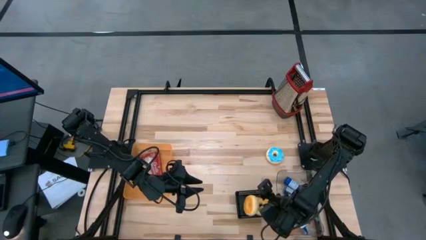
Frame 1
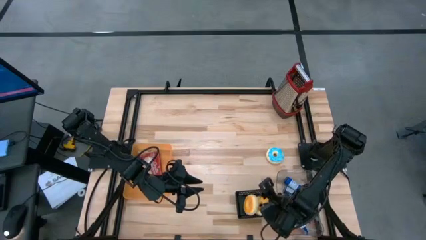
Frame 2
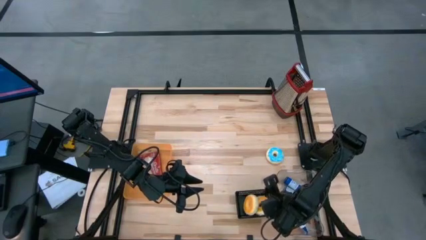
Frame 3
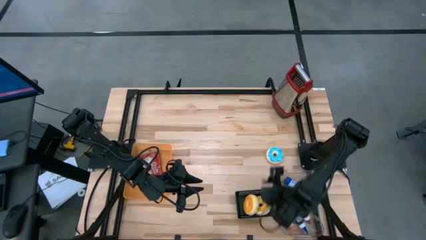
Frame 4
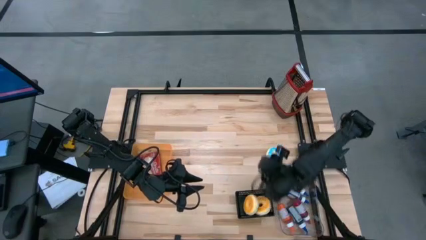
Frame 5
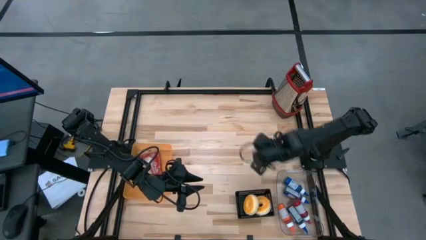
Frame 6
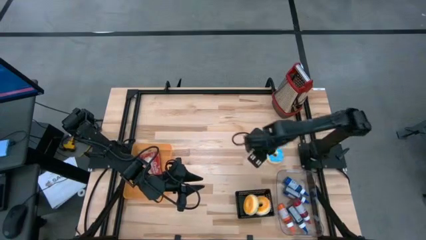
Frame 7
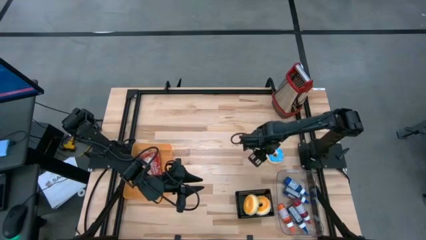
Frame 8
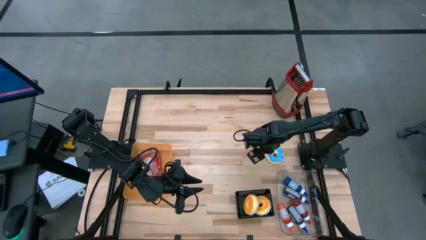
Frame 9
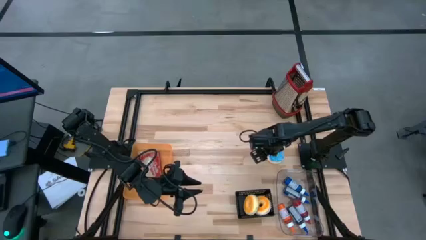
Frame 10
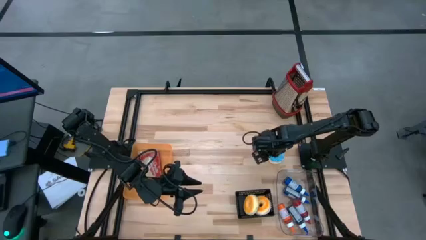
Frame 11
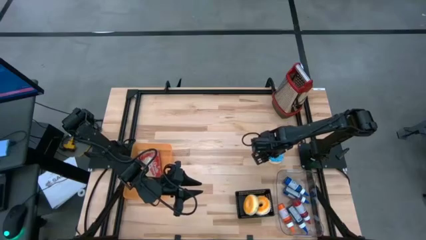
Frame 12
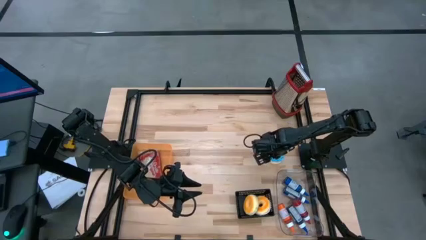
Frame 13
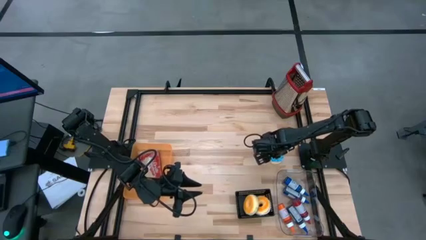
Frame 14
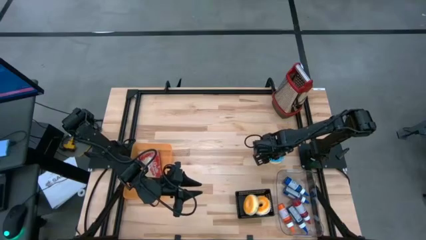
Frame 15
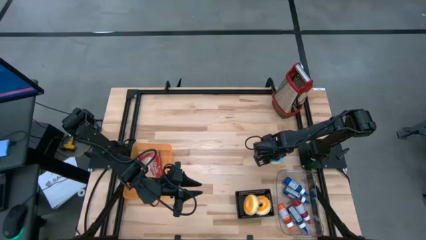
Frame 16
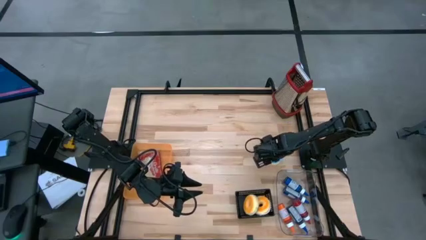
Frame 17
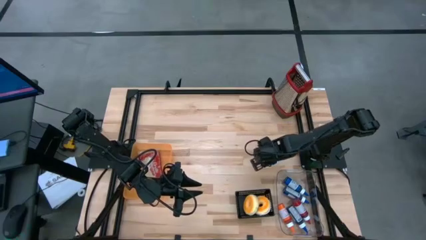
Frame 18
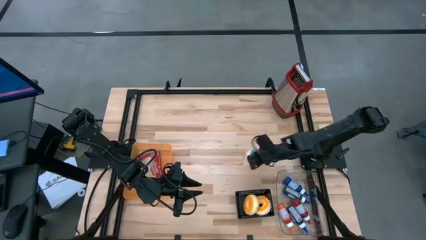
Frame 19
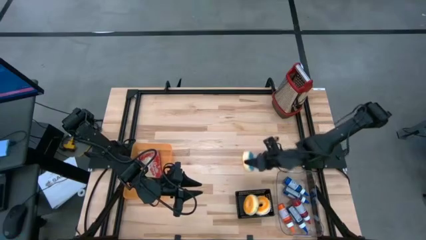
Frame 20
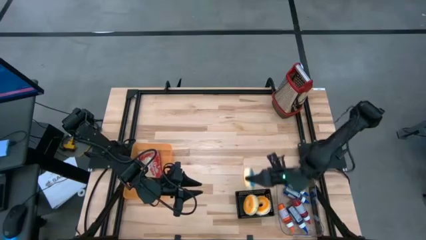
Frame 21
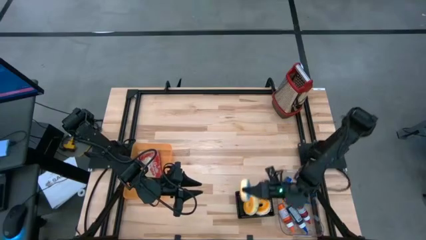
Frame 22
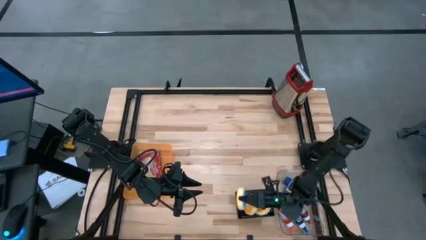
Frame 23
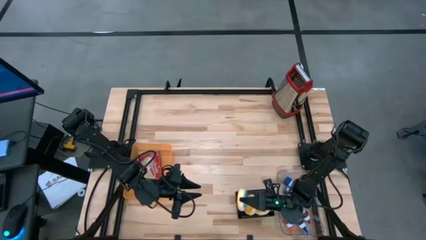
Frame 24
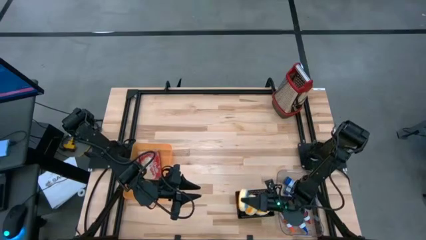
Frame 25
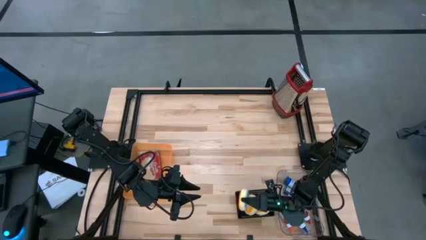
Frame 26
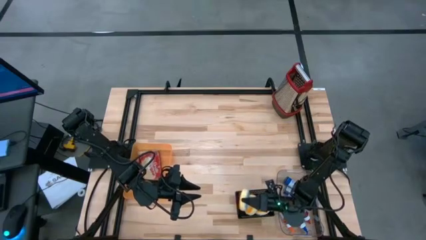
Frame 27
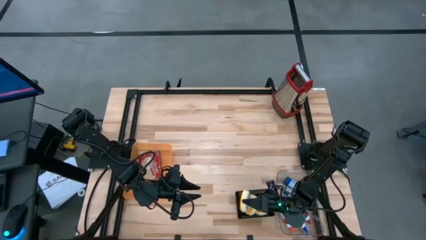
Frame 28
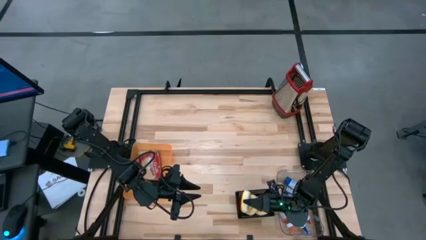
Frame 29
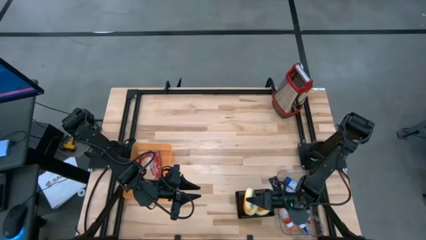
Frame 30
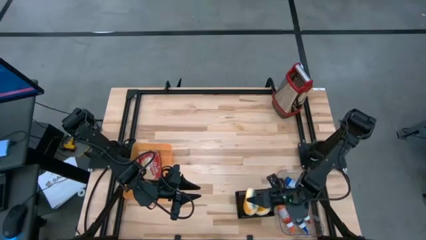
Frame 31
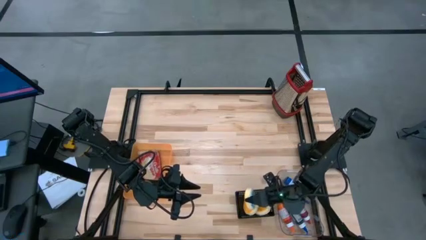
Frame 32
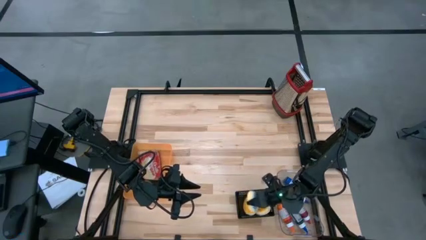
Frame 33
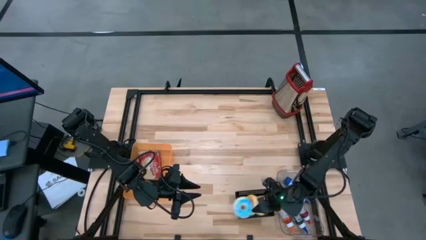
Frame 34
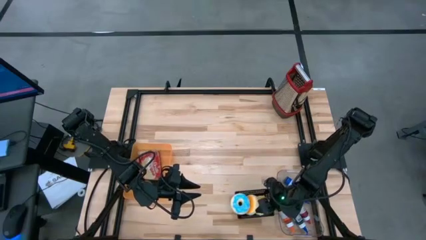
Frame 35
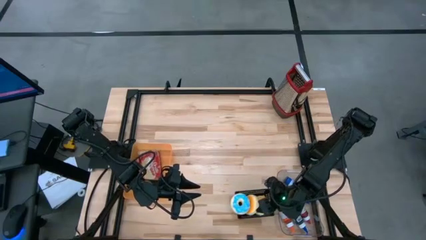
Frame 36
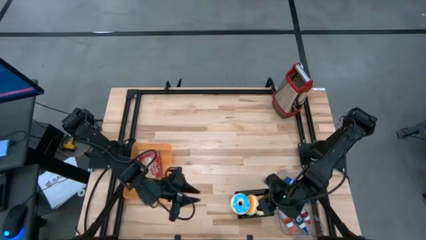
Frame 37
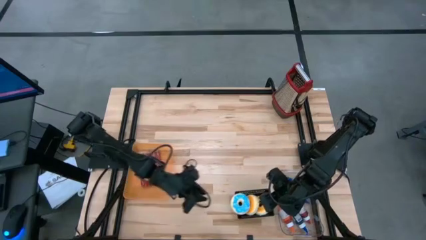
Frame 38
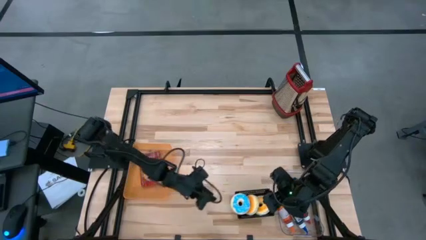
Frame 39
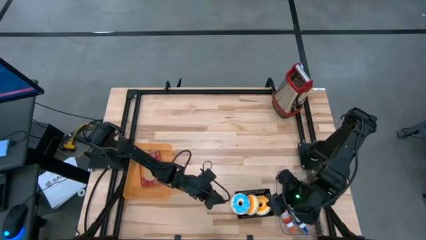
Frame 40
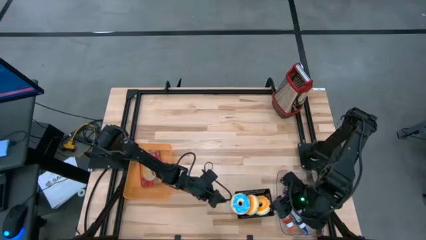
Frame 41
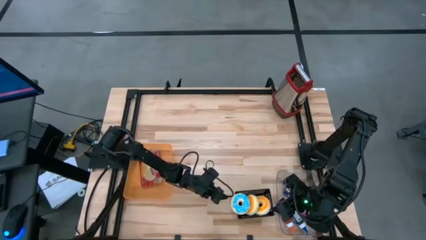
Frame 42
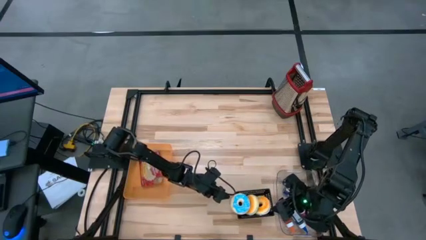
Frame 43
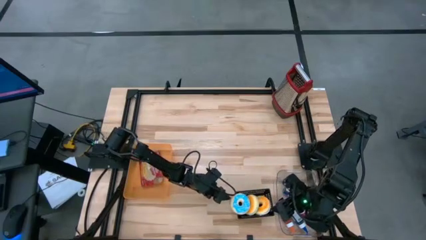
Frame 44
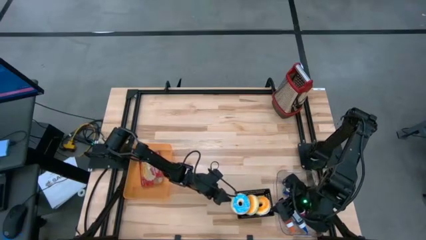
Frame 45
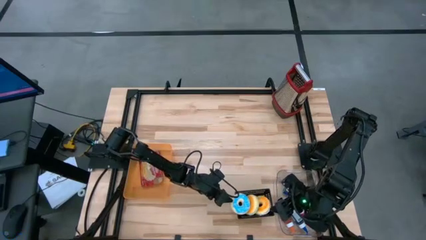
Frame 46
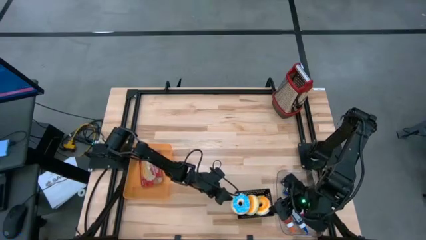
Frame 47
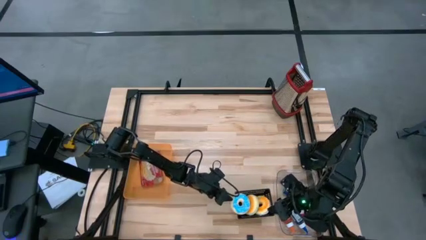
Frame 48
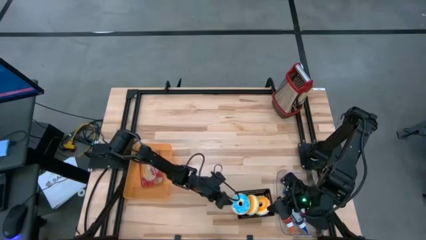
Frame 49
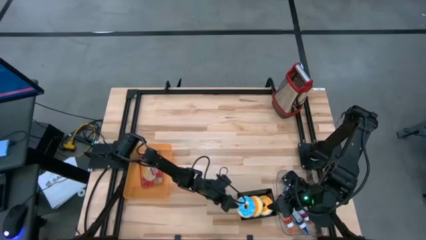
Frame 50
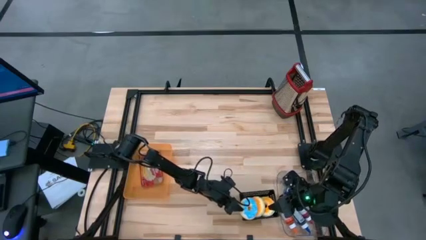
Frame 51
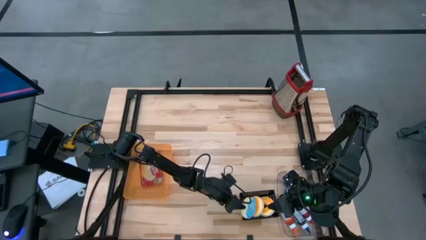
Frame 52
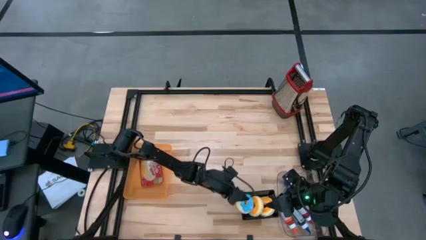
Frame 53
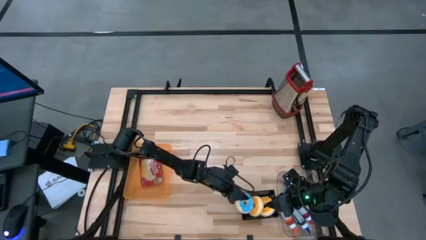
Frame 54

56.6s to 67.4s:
Task: Pick & Place Food Item
Put the blue donut into the black bin

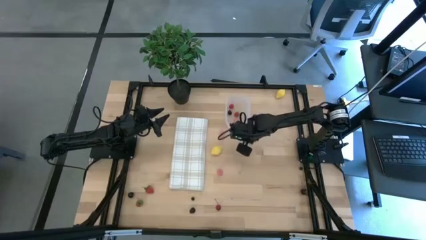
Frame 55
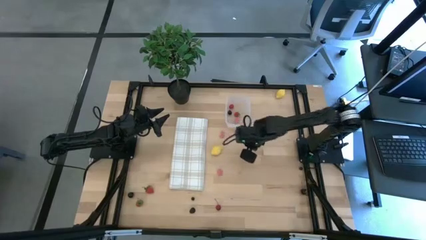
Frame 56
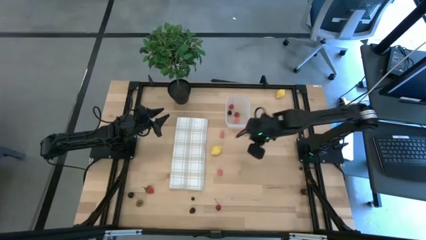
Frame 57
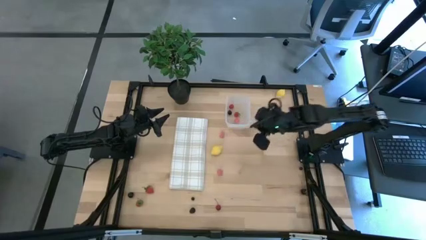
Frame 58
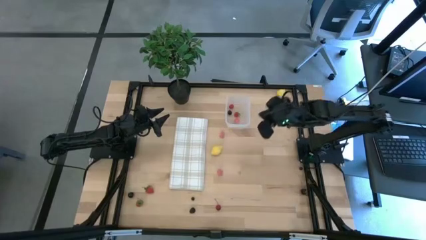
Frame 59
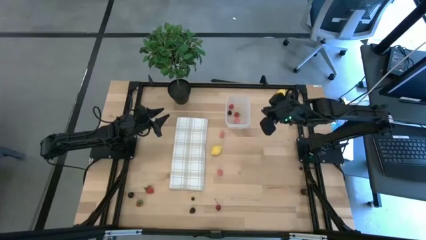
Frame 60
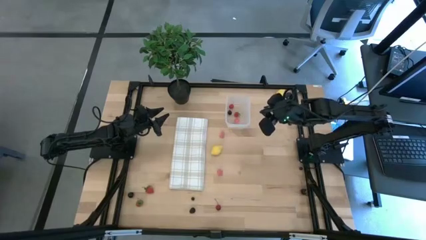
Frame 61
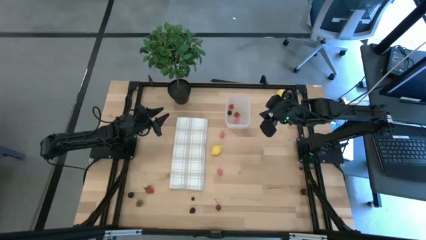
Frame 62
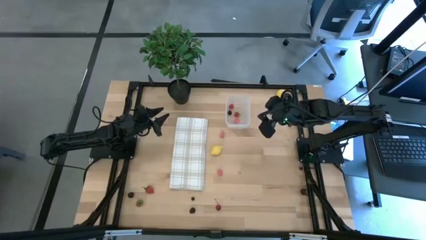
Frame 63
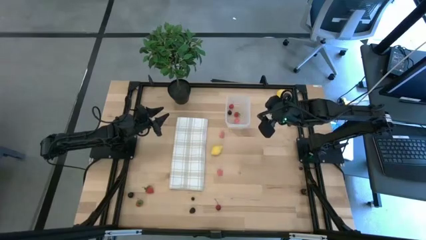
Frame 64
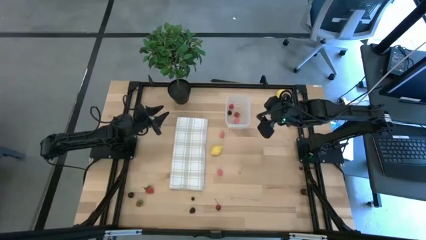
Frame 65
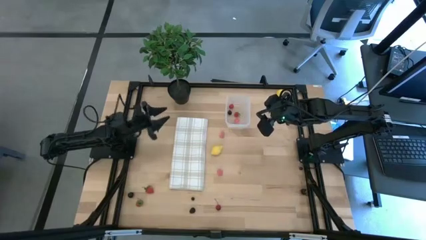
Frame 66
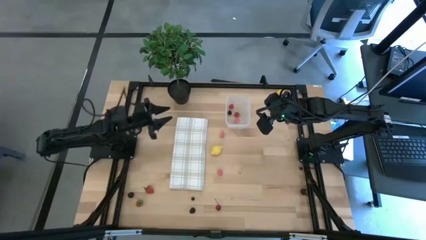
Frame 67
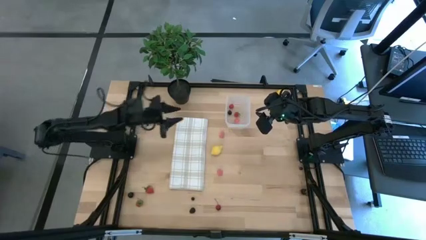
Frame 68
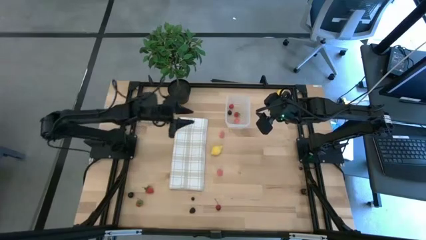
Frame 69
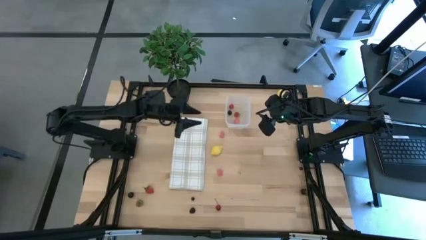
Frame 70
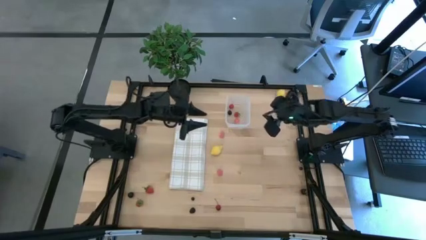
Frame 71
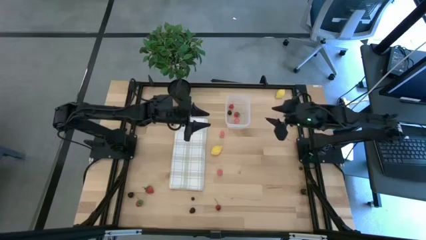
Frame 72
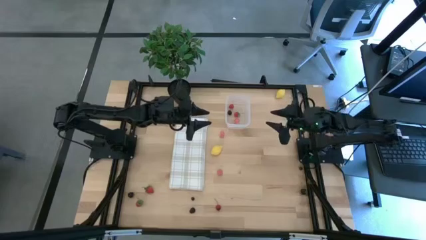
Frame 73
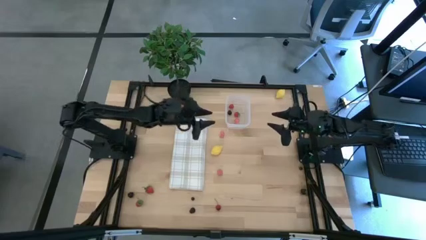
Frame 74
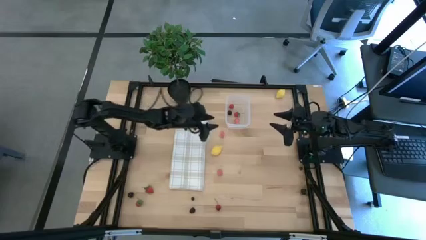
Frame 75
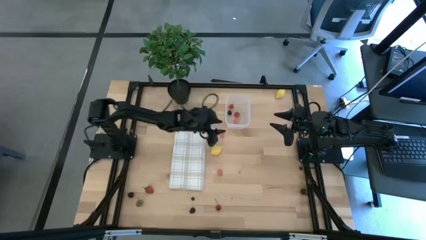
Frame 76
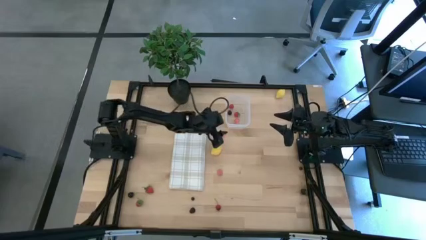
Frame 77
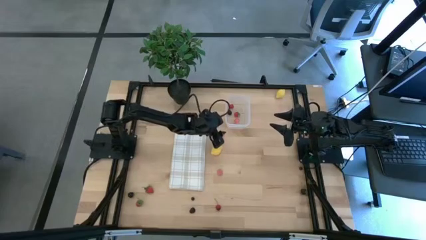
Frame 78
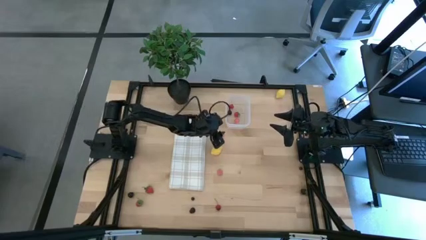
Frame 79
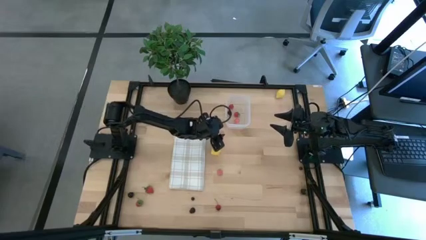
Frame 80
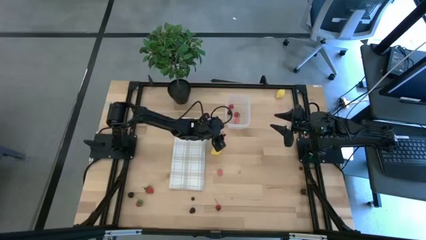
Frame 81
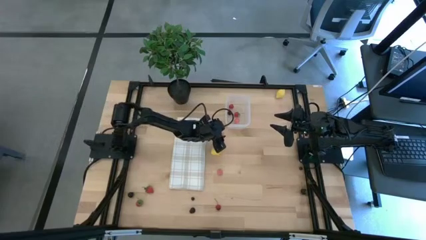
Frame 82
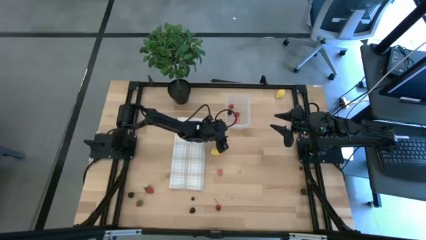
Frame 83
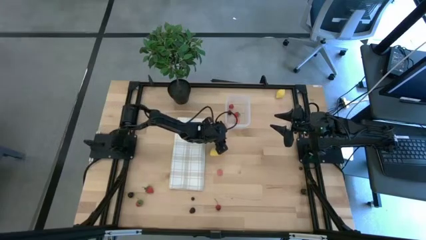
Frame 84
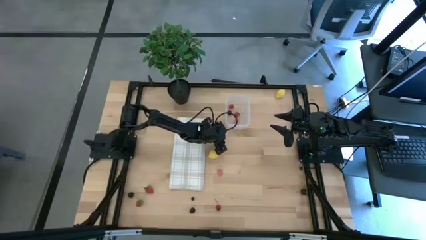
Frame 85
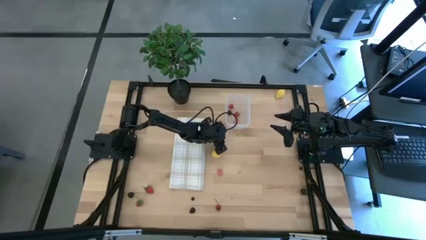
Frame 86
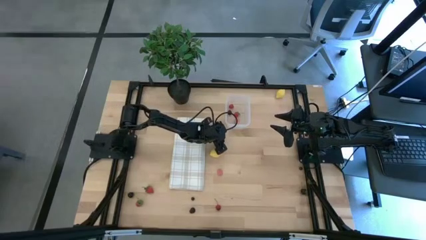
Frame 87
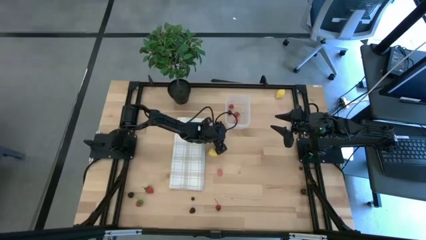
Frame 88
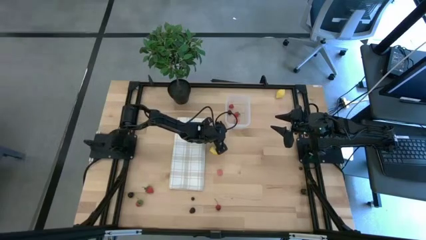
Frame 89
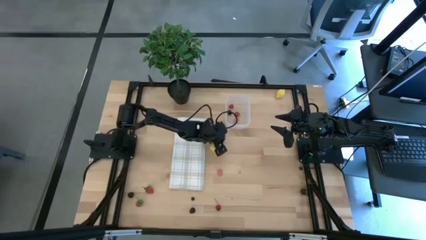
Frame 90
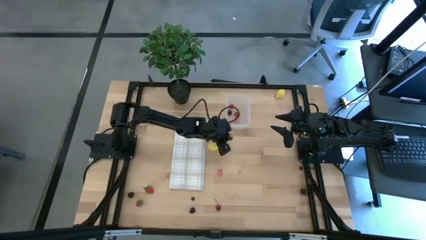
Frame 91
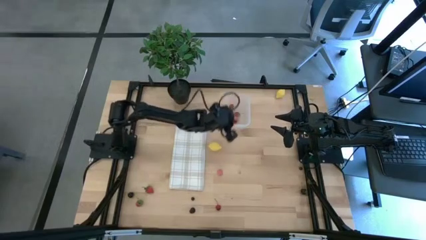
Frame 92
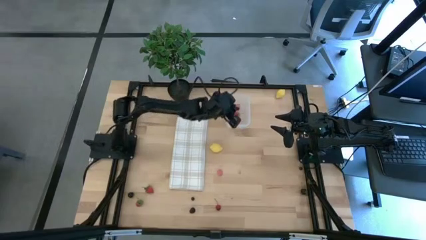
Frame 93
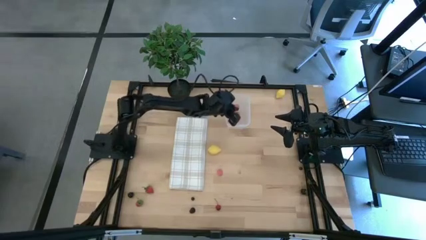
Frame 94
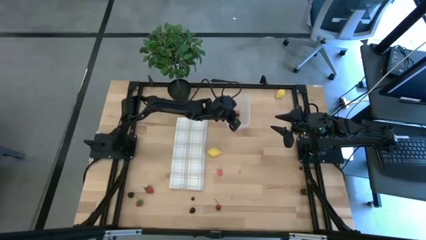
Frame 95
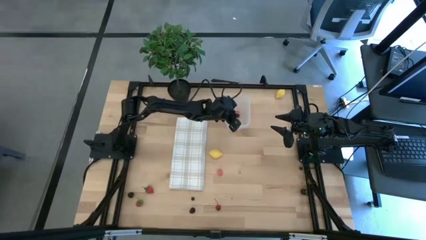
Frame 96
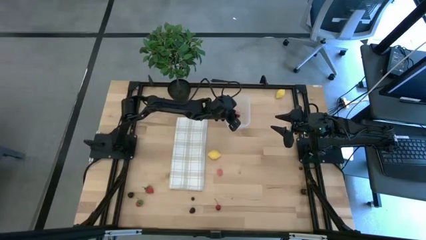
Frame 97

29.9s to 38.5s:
Task: Pick and placing Produce into tupperware
Put the top apricot into the transparent bin
